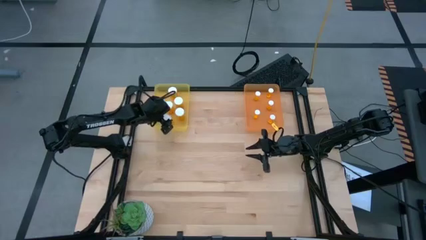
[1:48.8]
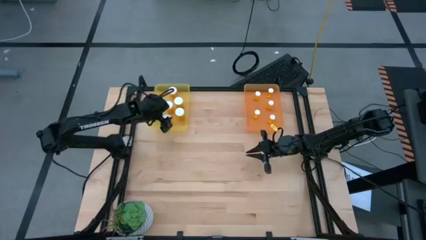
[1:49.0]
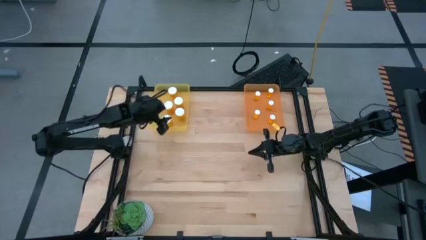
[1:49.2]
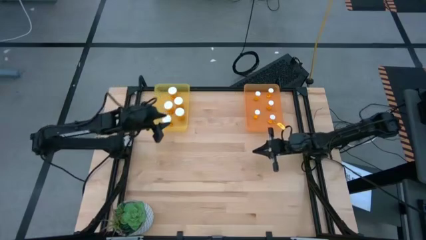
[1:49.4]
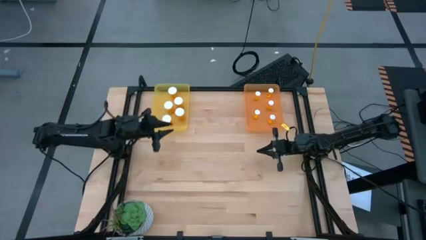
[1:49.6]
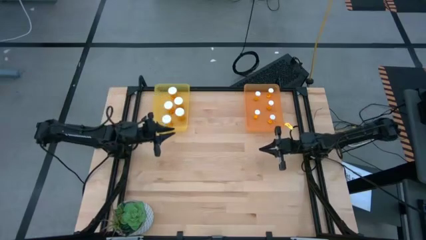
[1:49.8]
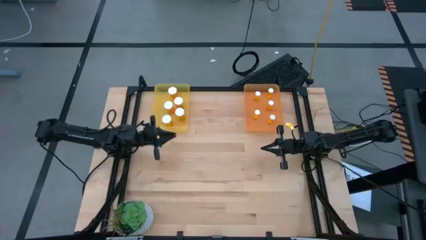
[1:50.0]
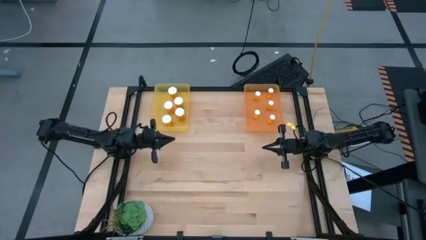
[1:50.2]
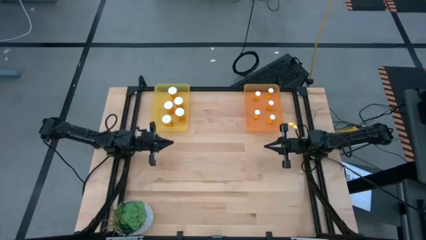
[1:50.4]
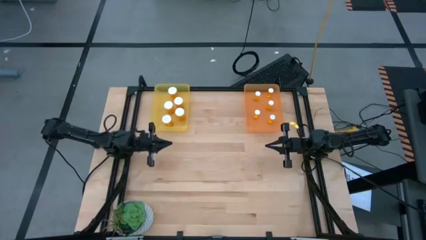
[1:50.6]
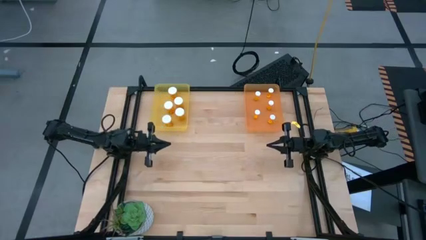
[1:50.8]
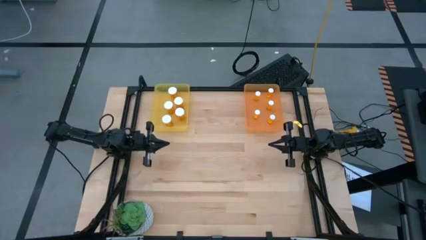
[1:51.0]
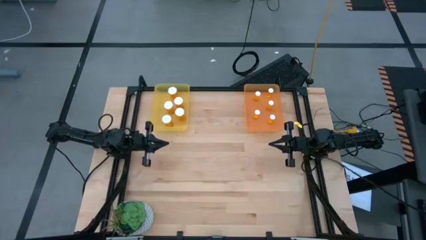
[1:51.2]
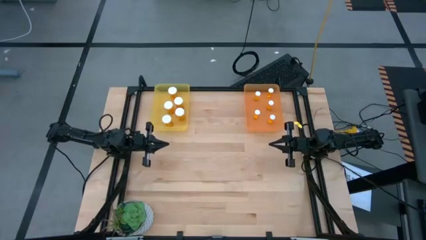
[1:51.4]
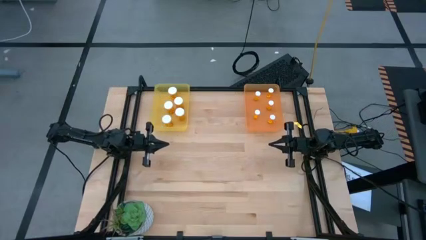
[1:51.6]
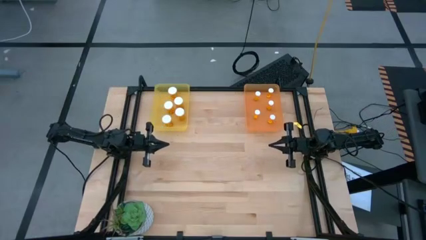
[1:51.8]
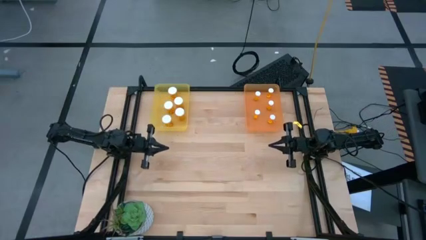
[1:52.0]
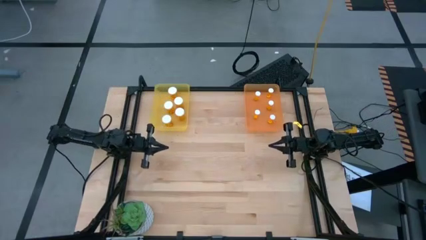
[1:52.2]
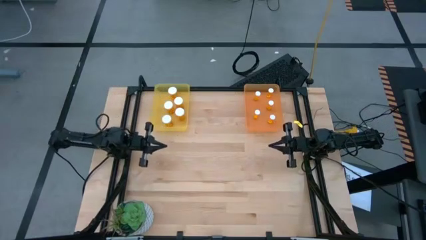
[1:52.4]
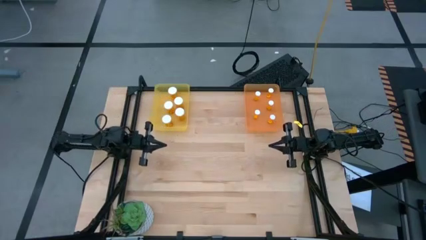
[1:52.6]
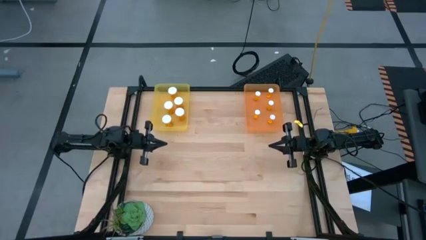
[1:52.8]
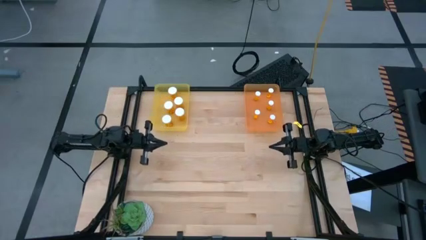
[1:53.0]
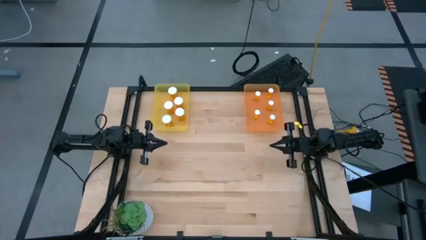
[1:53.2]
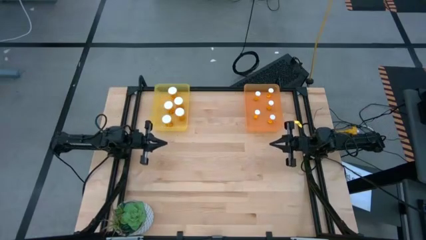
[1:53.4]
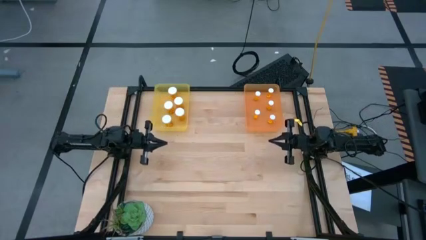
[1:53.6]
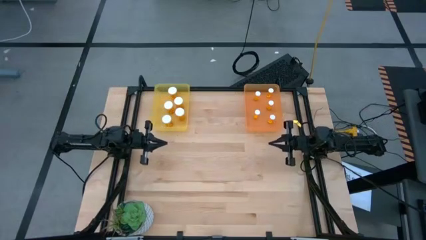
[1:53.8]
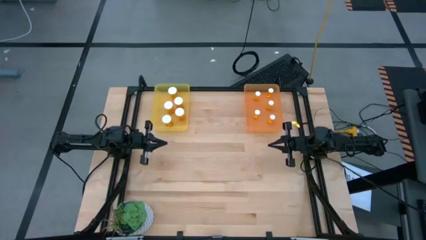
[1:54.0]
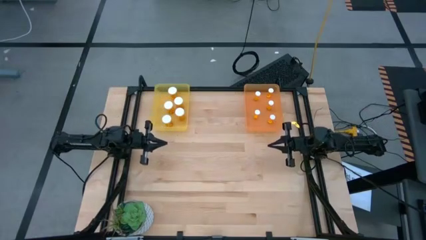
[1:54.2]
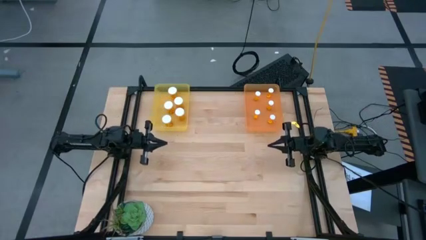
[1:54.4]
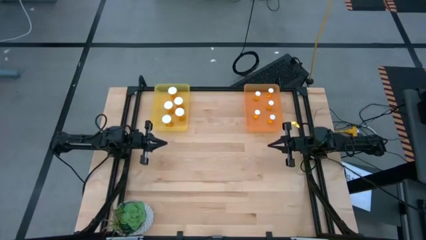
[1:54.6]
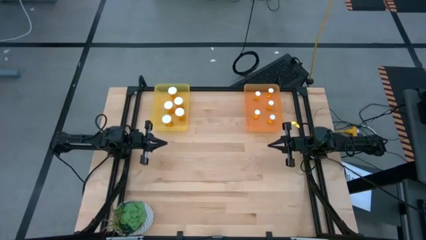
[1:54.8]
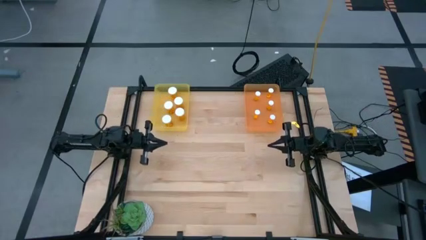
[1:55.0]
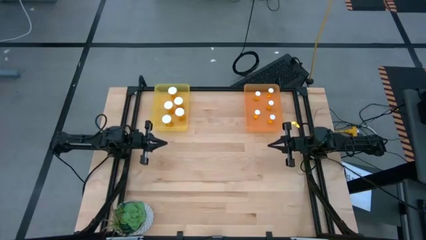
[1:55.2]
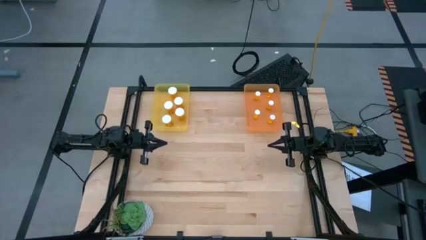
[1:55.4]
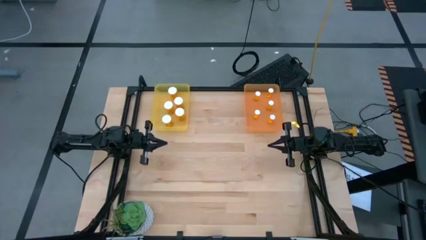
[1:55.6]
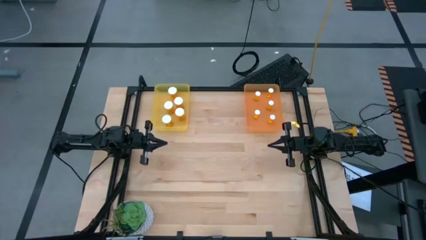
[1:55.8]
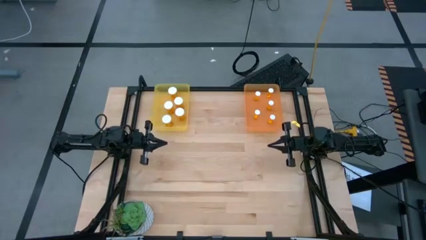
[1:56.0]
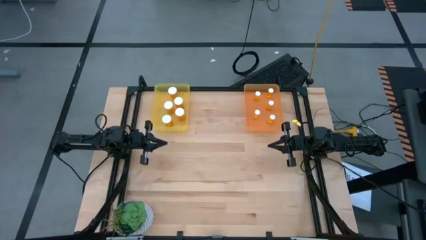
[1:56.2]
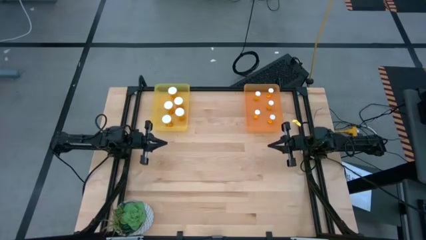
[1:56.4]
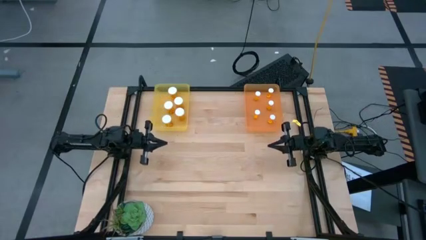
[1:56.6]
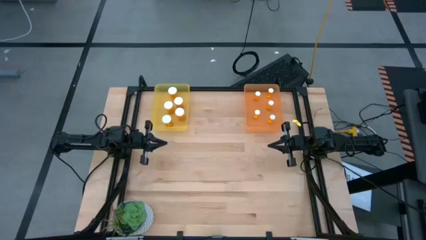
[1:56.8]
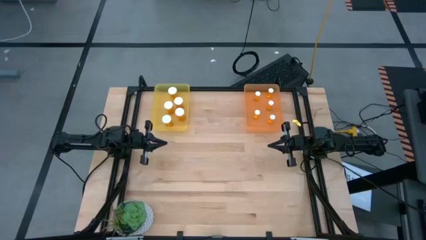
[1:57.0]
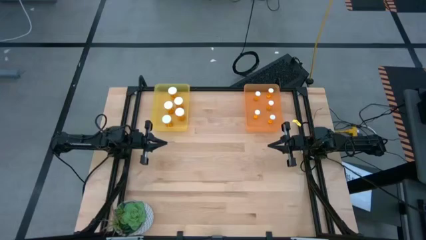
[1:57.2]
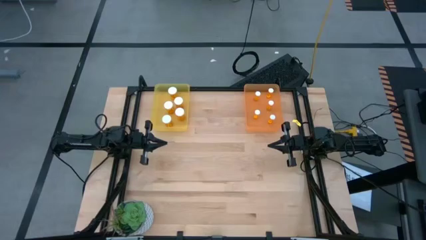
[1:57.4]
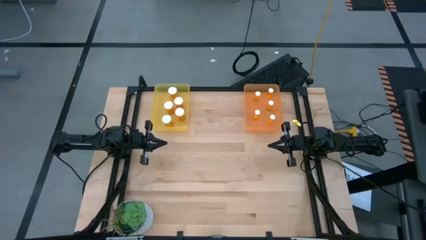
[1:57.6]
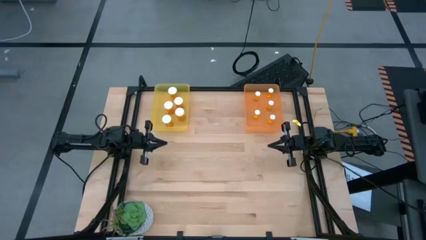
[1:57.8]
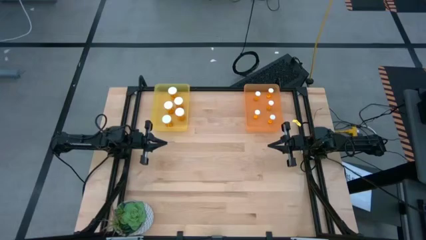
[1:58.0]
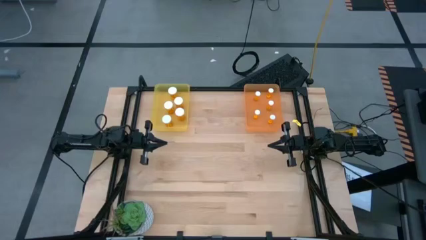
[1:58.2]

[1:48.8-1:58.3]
Task: Pick and place medicine bottles into bin by pill shape (circle, oval)
Return to Home Position

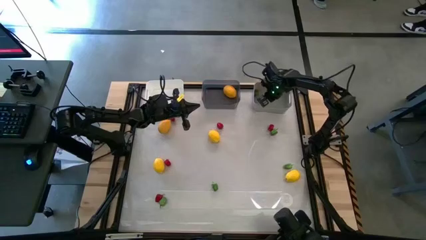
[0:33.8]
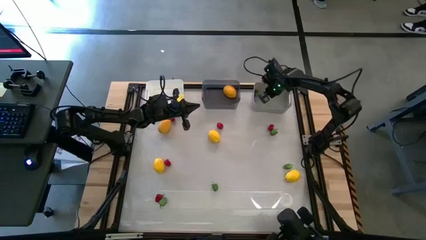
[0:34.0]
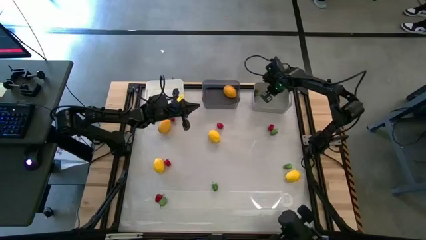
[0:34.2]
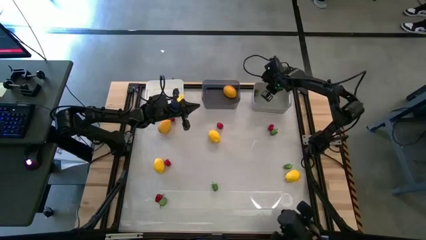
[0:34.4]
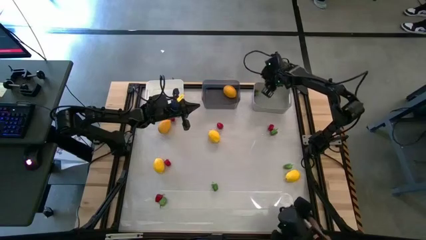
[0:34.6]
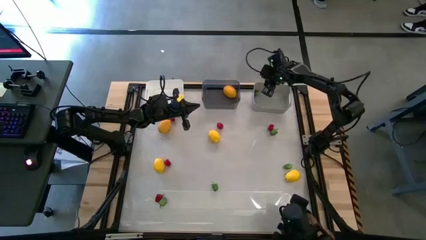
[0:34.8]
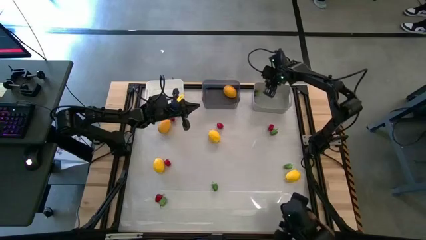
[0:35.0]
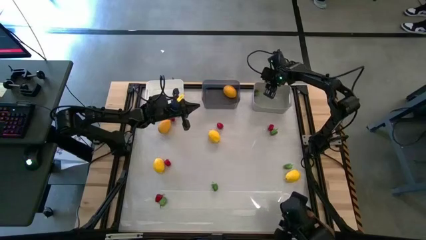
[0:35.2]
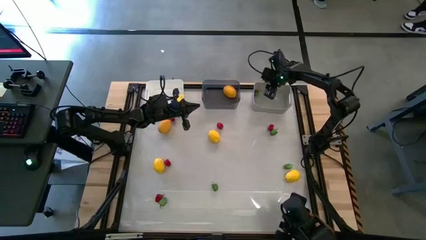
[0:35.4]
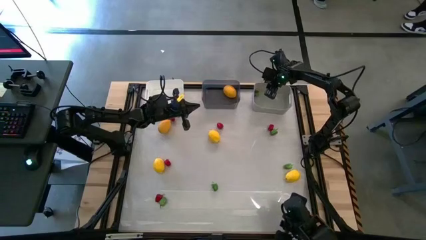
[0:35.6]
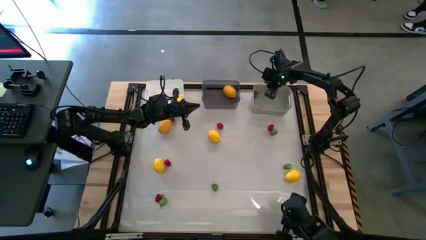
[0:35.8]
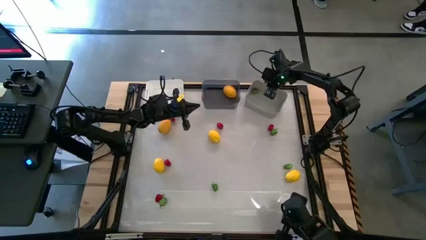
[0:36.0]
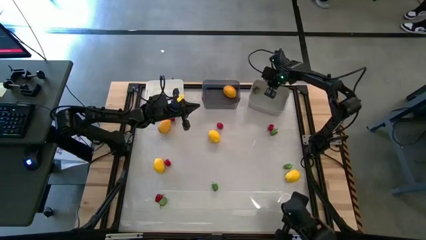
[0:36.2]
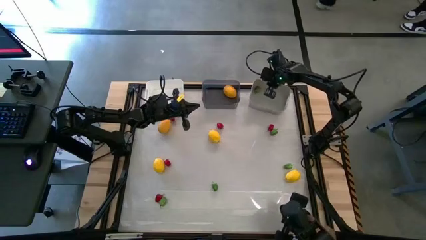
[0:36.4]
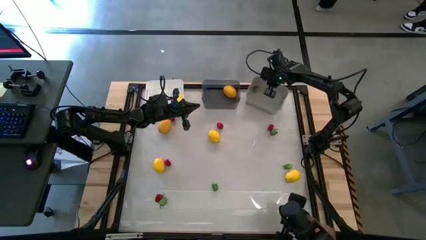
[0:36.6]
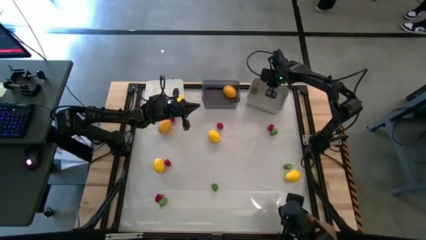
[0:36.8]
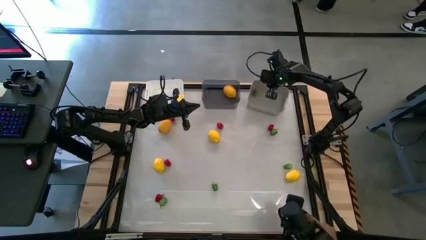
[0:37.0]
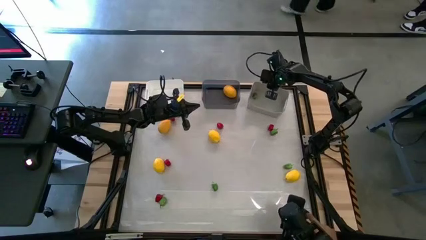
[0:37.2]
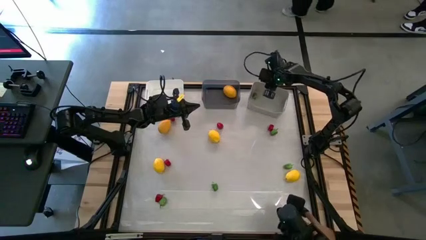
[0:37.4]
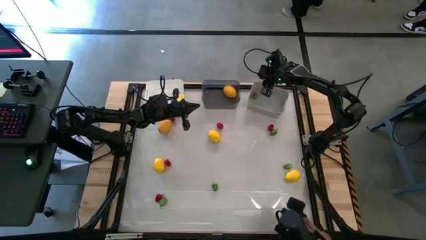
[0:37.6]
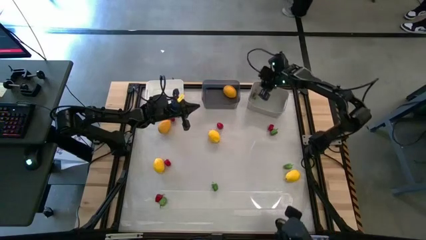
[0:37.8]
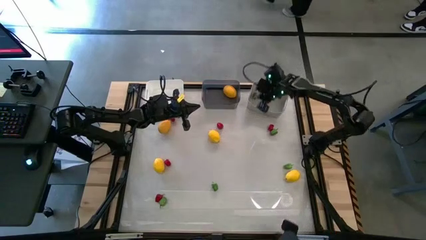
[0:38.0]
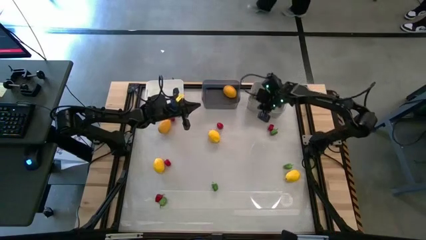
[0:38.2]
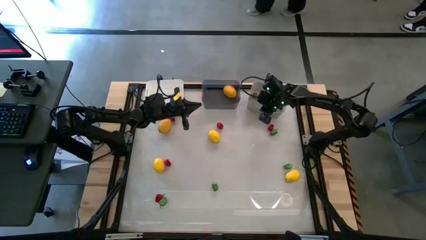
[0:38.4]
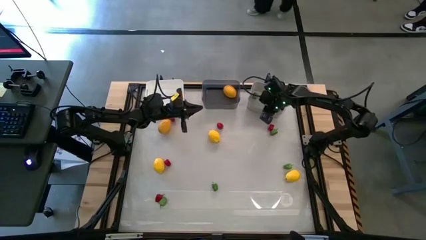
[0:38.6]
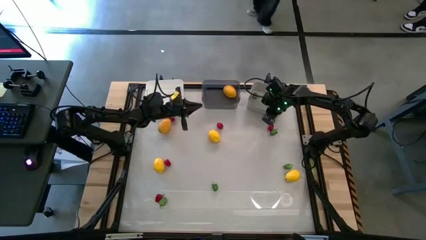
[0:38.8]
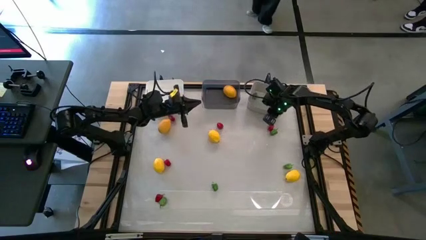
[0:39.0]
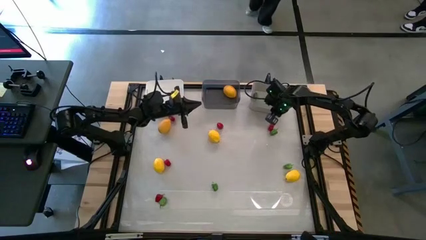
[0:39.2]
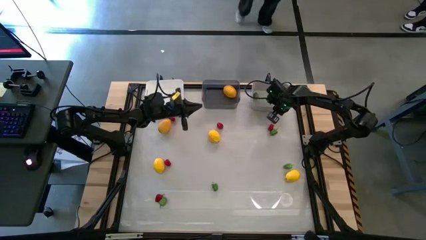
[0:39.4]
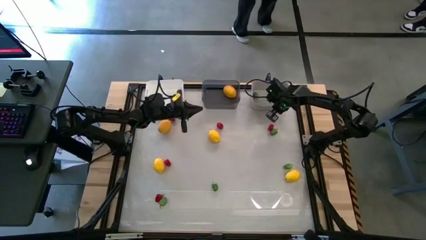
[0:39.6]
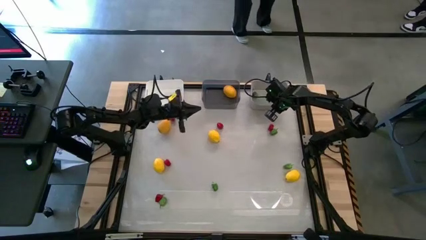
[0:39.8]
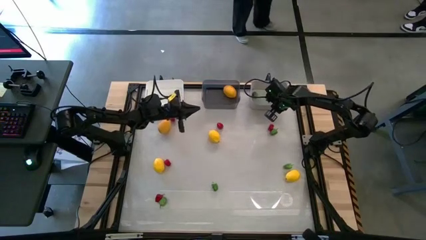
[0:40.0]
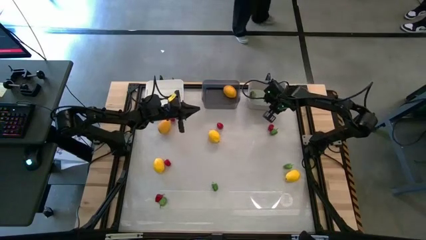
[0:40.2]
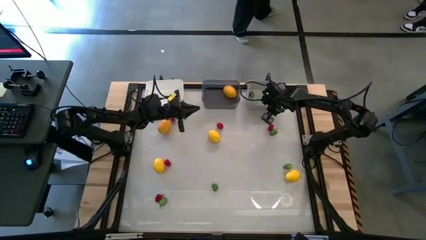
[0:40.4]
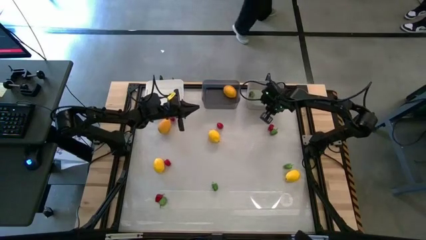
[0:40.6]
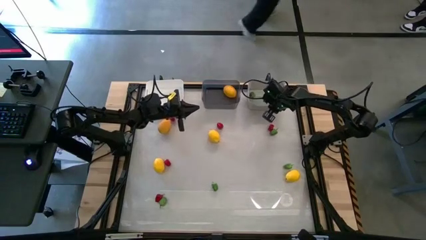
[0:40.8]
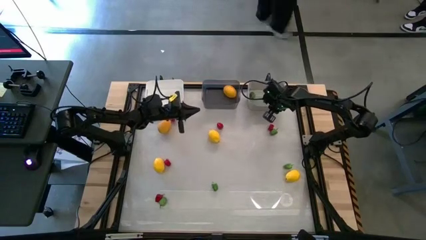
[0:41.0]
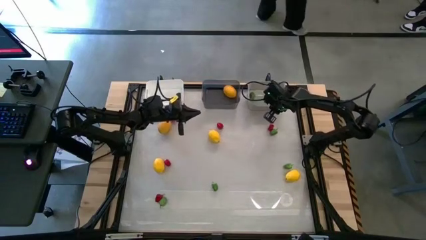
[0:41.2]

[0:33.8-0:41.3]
Task: Sort produce into baskets
Adjust the gray bin
